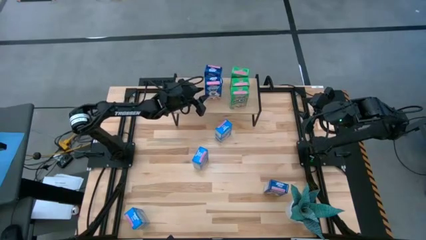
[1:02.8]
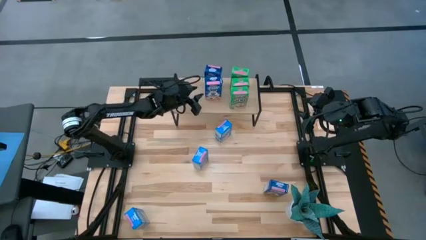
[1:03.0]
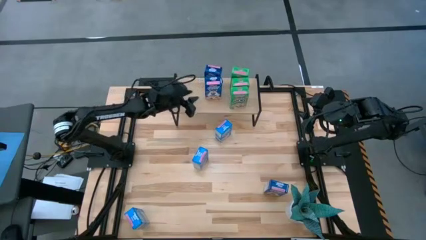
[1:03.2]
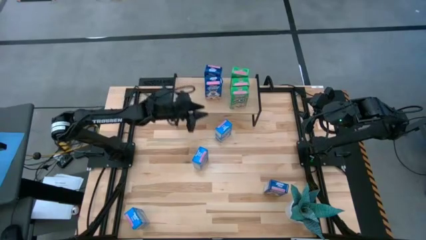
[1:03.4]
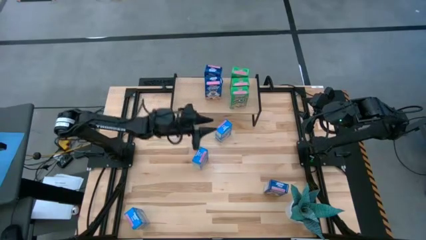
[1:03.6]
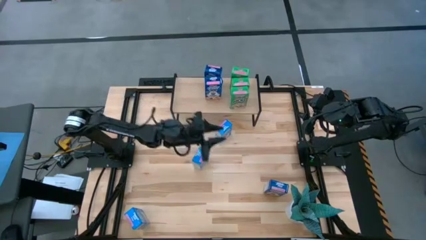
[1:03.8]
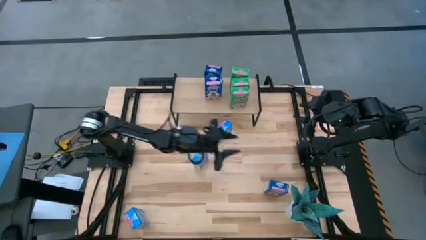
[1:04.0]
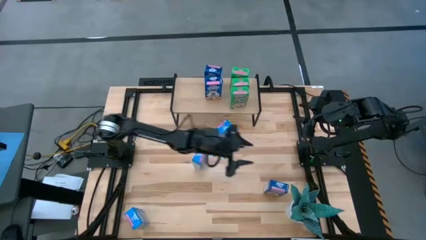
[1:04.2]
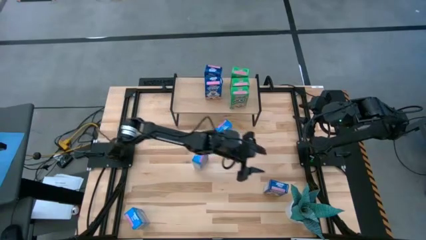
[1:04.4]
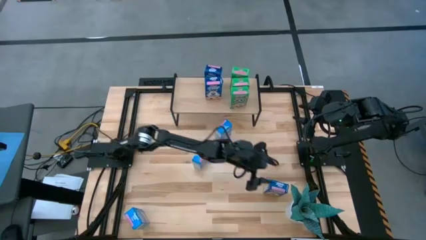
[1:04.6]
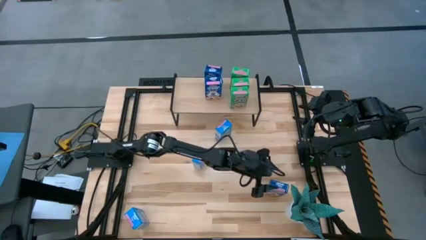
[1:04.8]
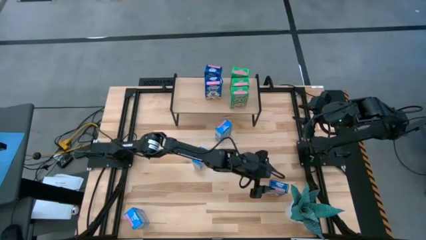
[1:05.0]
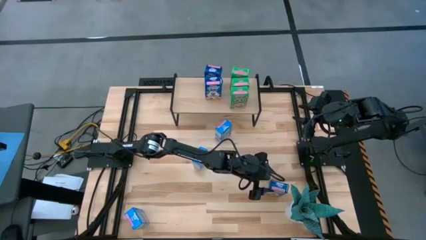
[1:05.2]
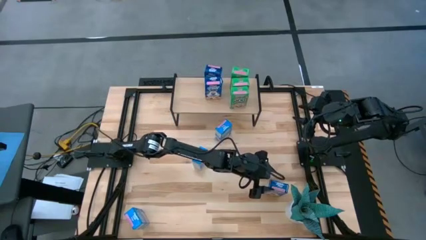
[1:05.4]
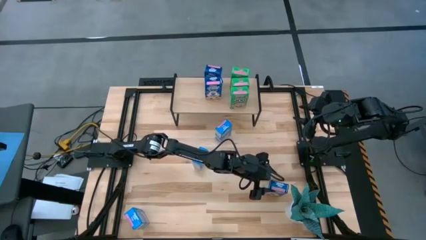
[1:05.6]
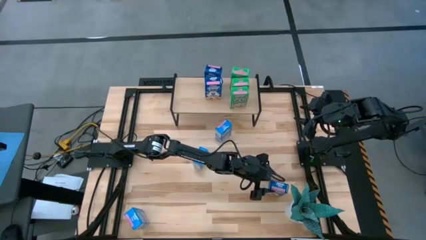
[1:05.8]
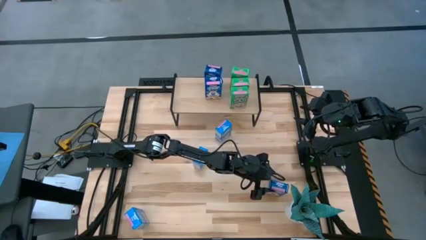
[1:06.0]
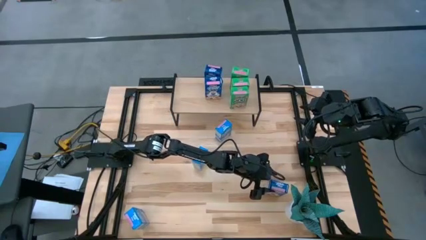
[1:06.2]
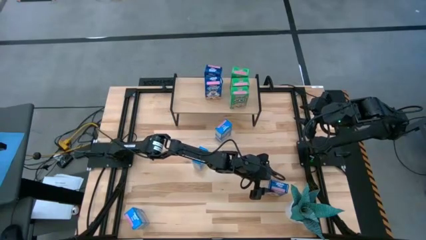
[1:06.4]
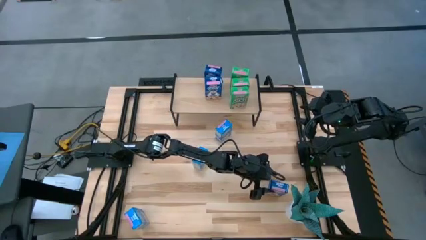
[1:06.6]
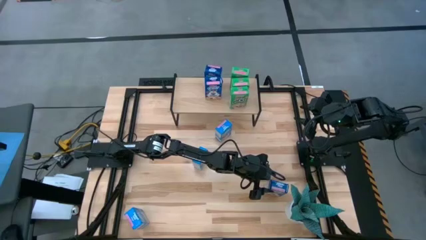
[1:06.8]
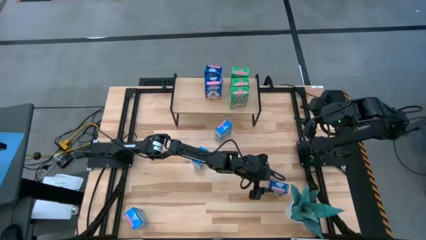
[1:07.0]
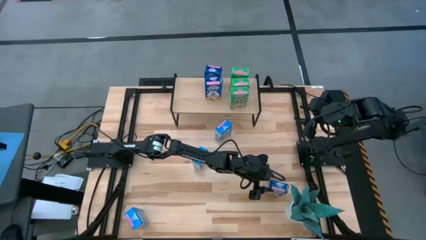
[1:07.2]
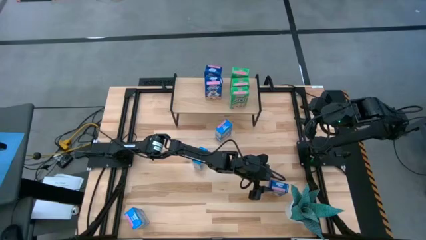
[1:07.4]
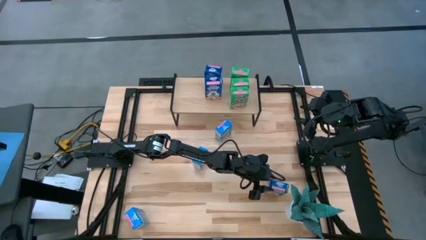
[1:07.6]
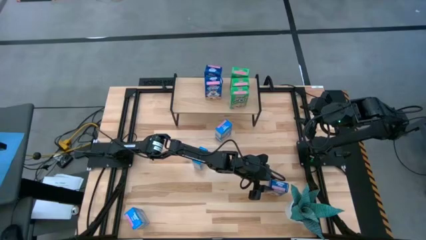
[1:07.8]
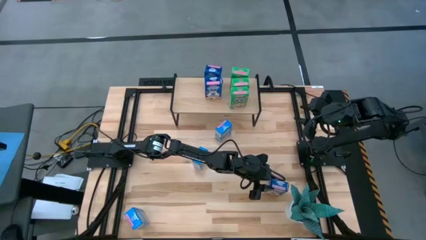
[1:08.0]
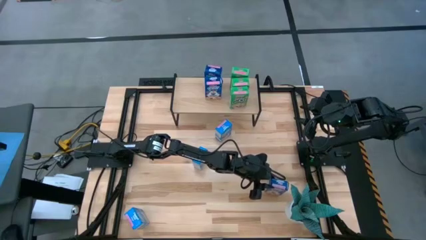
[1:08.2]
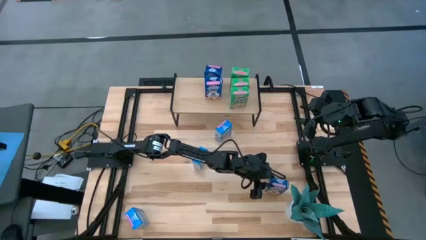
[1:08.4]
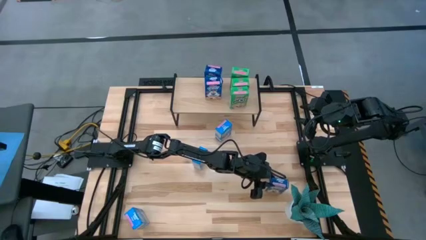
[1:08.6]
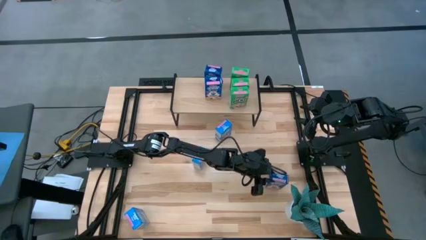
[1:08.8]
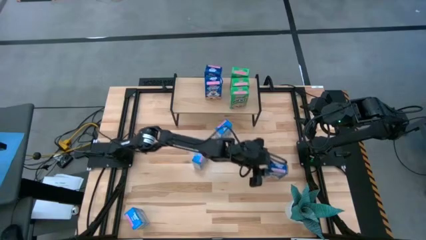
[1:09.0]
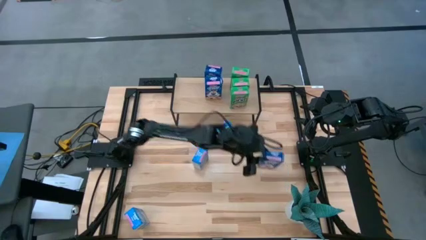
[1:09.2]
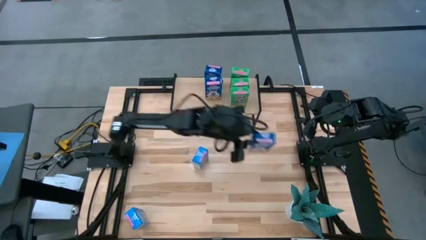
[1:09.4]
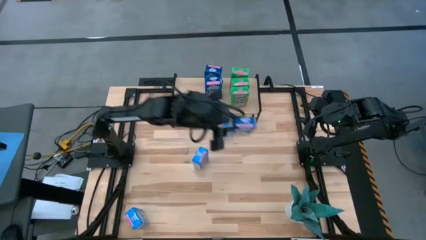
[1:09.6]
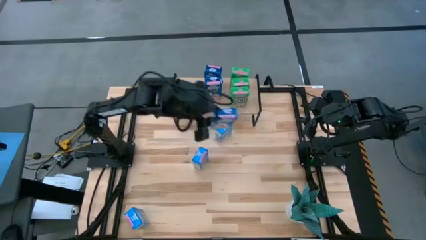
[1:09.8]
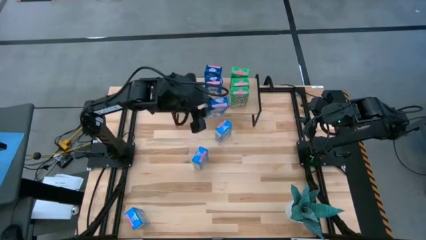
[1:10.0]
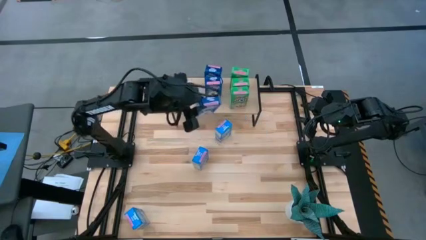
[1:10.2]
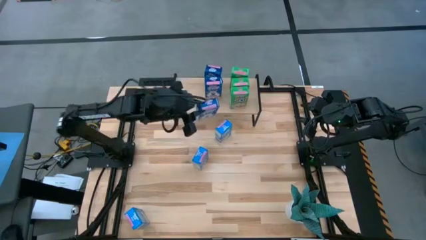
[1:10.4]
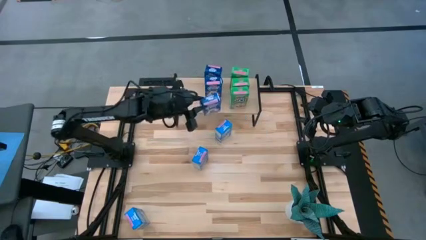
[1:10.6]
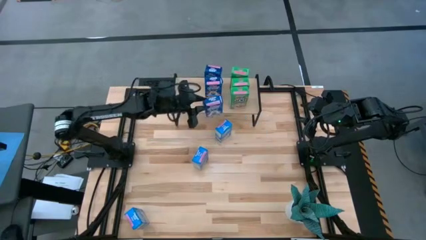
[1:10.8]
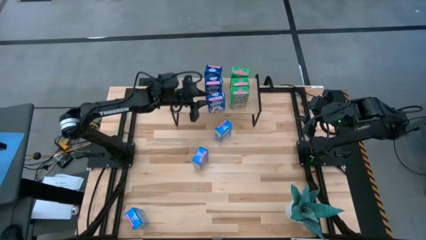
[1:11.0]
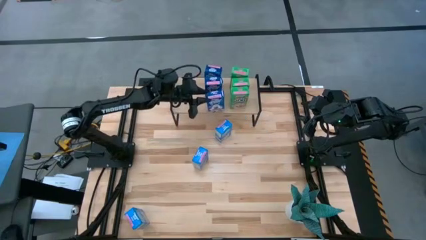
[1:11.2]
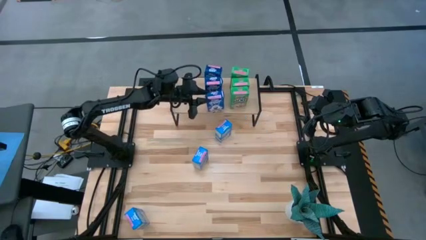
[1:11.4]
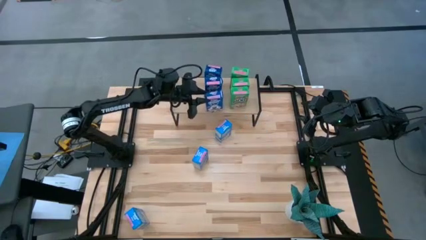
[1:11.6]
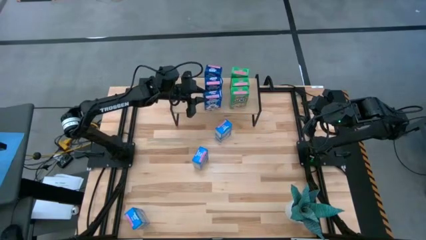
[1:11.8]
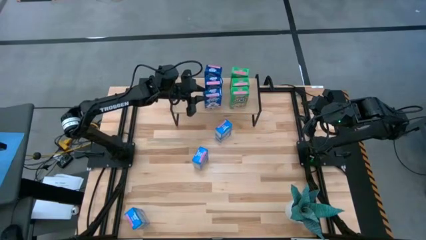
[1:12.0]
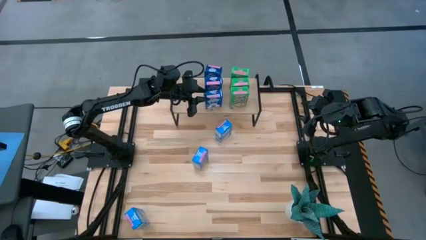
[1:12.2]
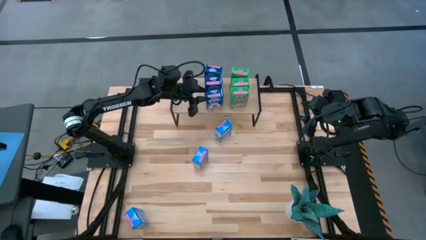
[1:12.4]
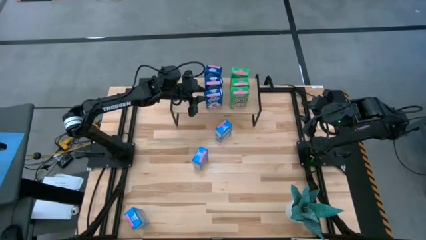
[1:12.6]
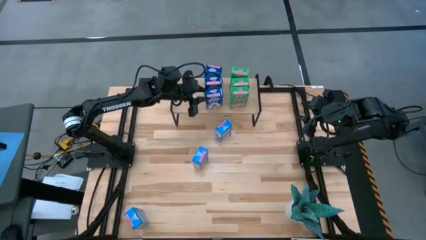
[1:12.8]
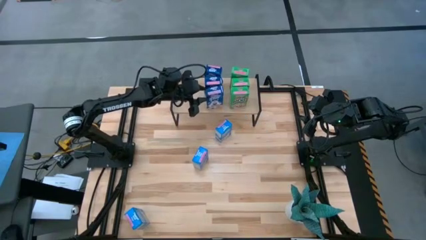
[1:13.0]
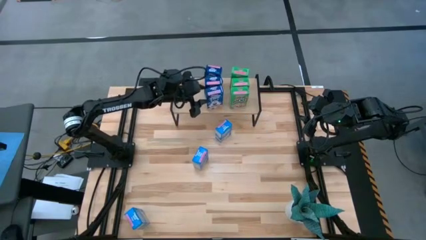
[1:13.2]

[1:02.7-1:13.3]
Task: Stack cereal on shelf
Put the blue cereal box aligned with the other blue cereal boxes on the shelf

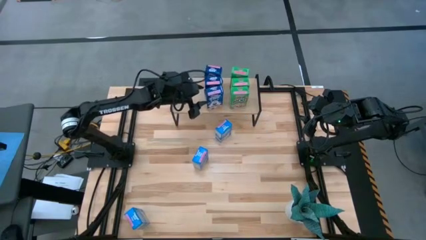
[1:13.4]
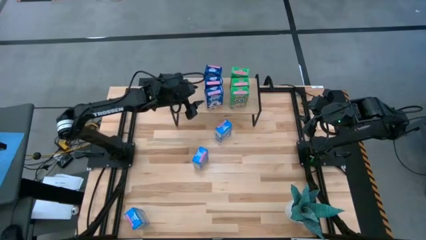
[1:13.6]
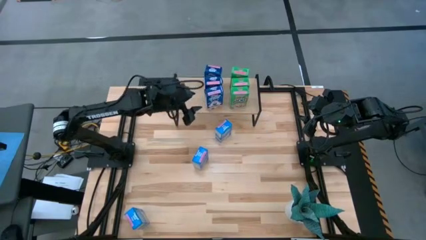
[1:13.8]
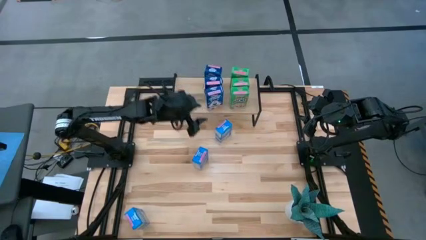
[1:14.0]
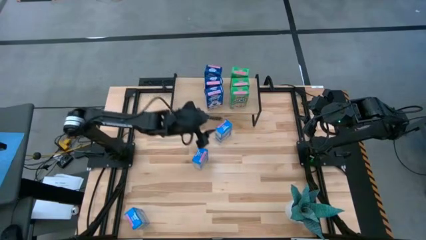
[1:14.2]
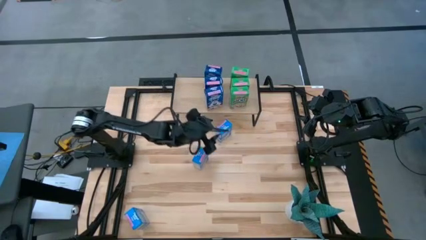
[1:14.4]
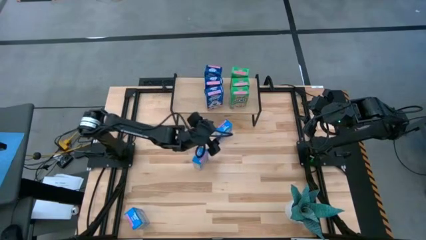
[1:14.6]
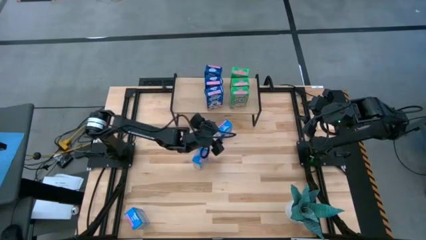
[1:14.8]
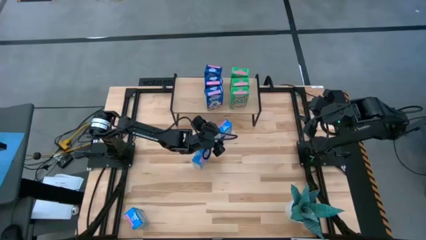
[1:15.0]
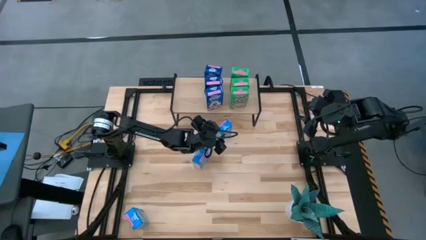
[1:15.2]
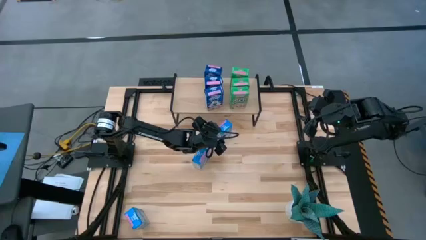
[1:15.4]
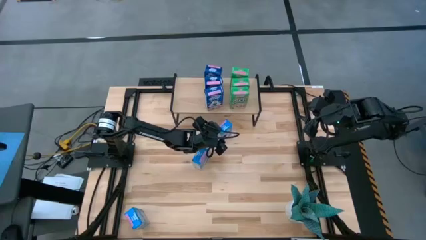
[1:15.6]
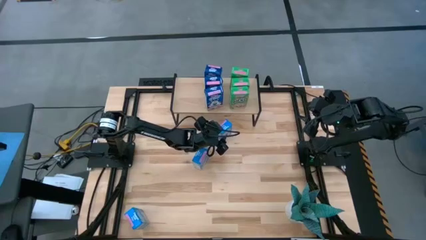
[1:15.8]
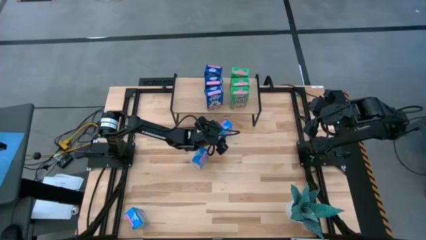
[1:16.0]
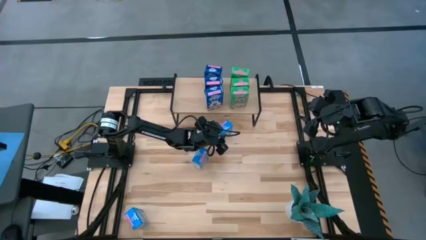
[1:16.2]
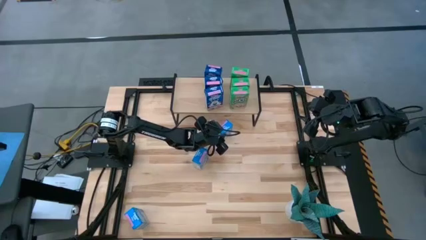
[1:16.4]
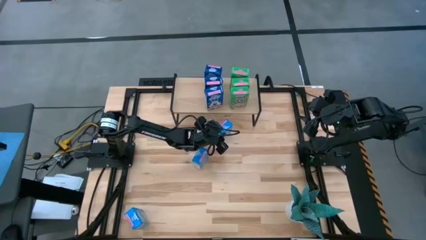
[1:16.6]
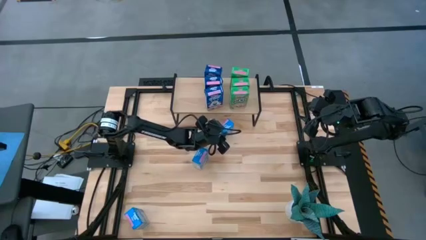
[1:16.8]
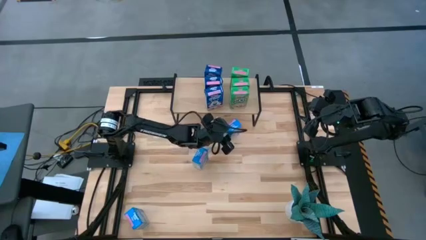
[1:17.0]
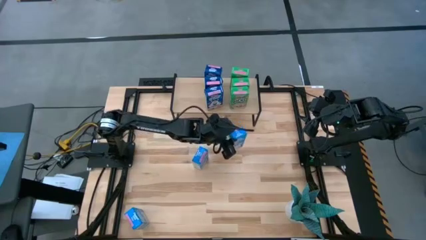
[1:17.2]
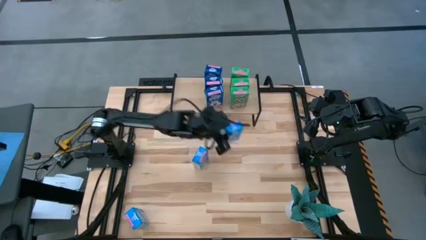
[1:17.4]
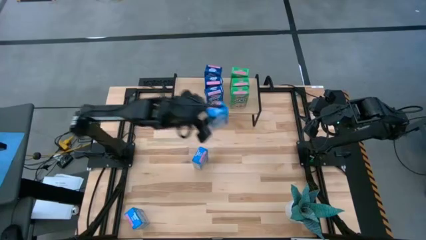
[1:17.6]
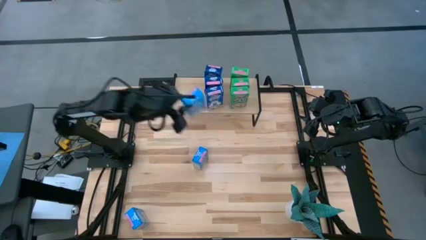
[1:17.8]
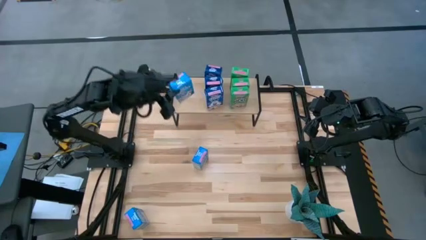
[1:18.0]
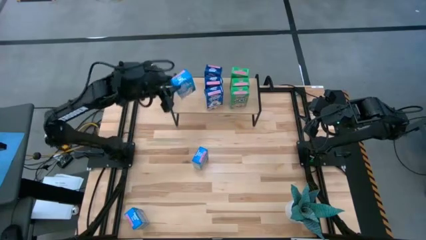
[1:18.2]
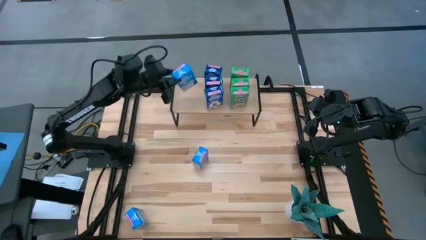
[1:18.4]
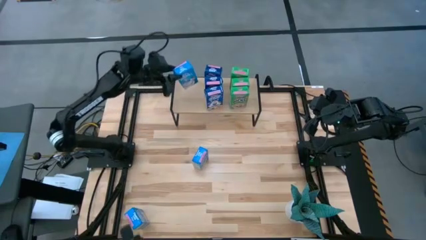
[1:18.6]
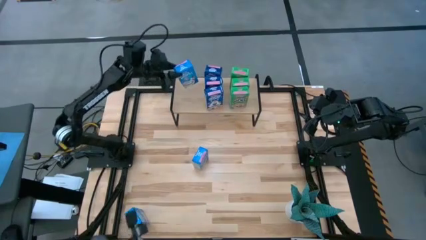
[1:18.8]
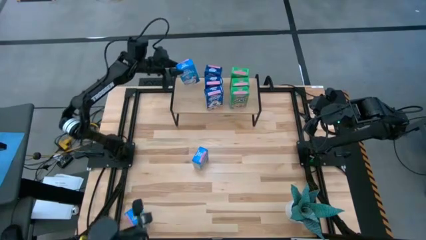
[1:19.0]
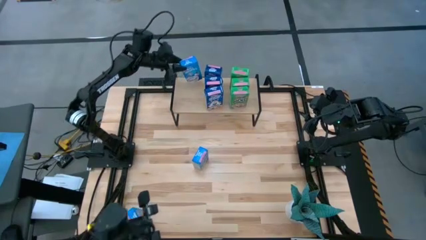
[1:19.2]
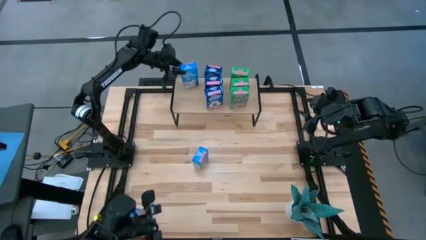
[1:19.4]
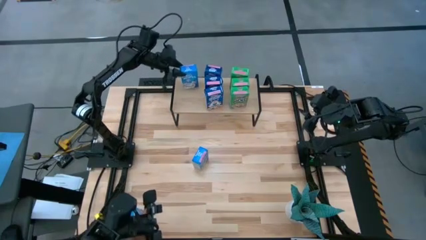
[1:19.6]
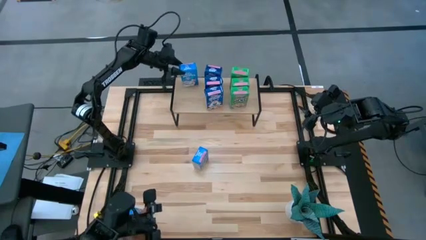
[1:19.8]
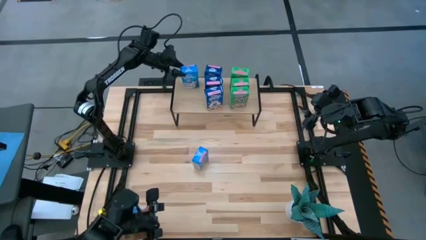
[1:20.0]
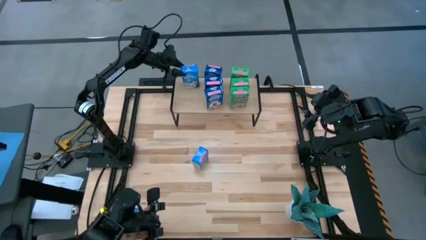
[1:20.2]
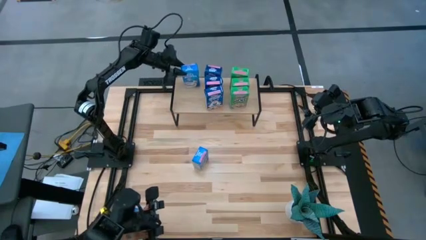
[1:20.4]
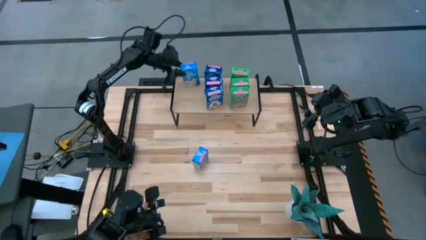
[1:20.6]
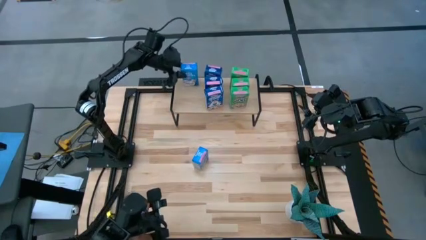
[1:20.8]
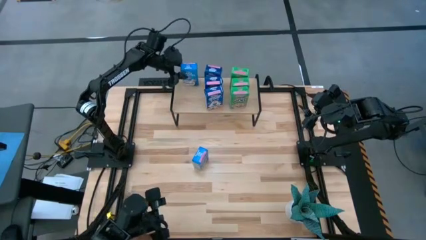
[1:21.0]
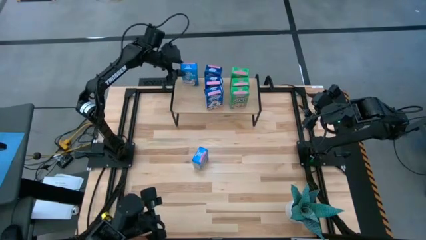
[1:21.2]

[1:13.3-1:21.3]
Put the top light blue cereal box on the shelf
